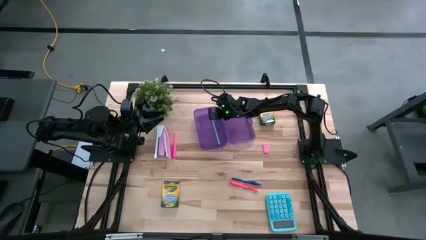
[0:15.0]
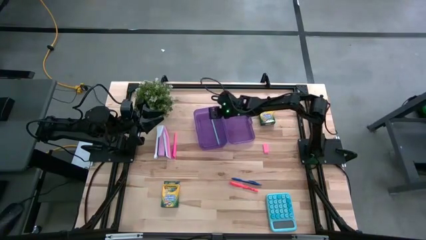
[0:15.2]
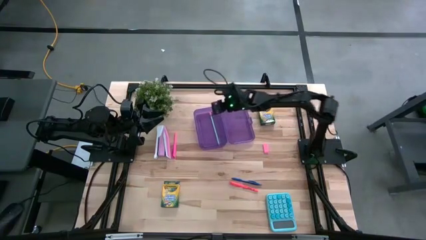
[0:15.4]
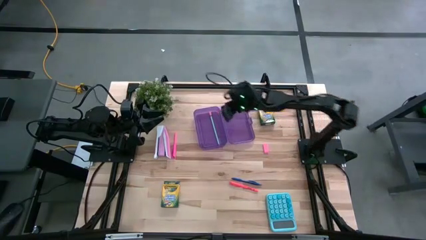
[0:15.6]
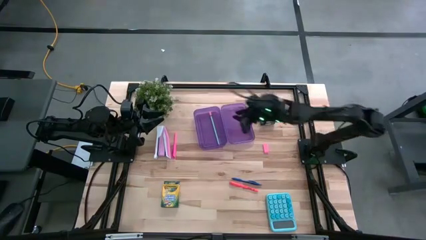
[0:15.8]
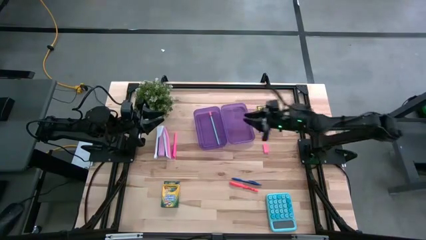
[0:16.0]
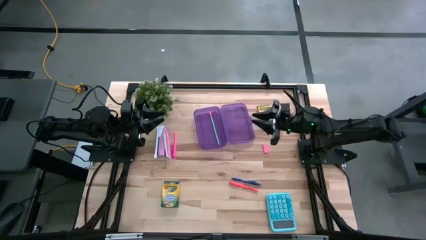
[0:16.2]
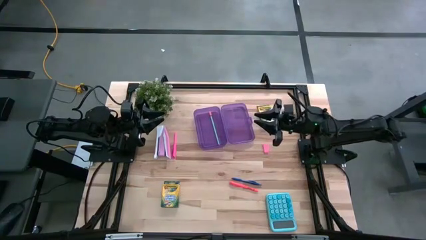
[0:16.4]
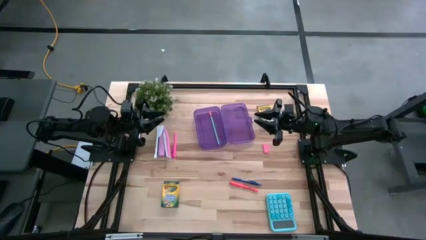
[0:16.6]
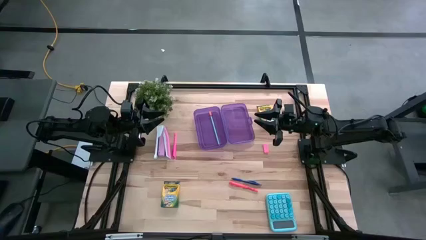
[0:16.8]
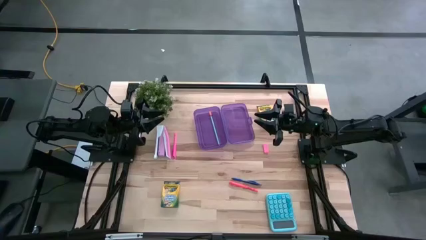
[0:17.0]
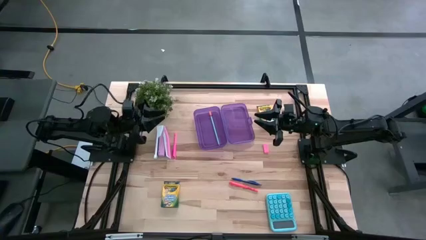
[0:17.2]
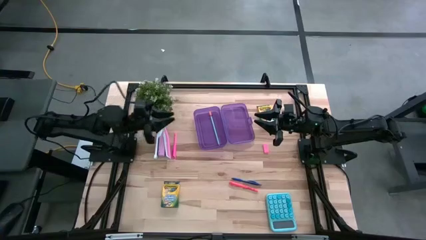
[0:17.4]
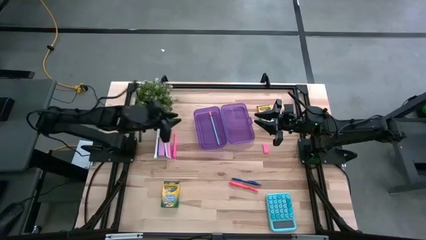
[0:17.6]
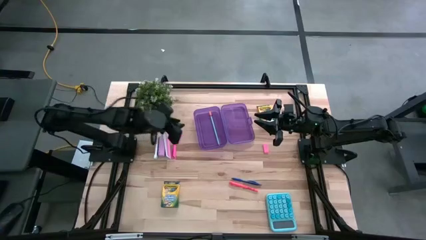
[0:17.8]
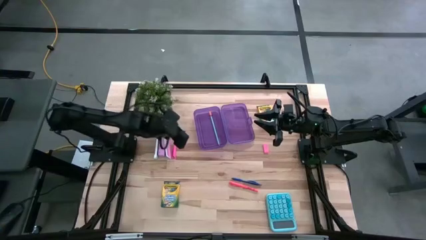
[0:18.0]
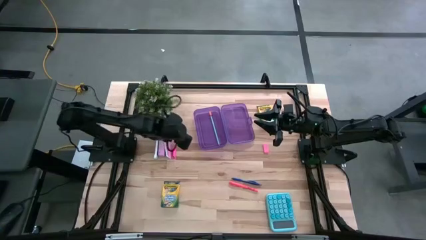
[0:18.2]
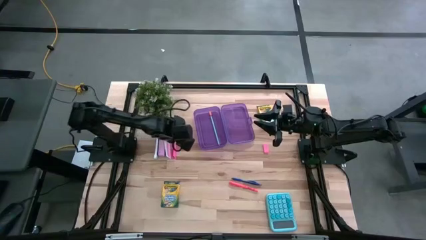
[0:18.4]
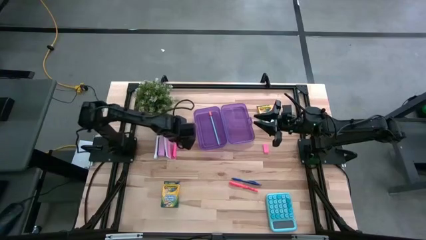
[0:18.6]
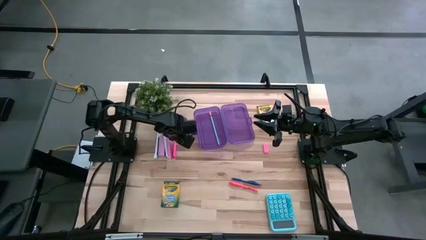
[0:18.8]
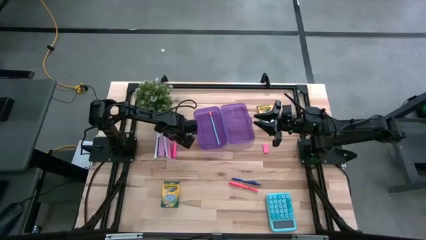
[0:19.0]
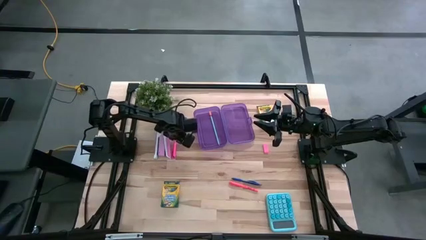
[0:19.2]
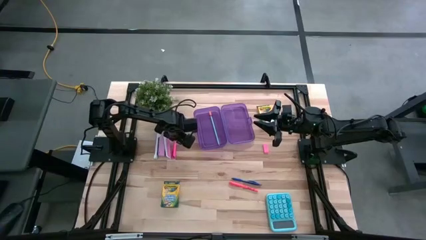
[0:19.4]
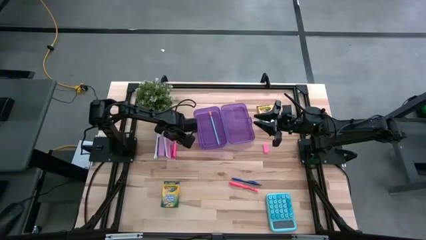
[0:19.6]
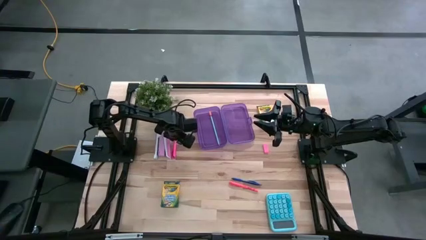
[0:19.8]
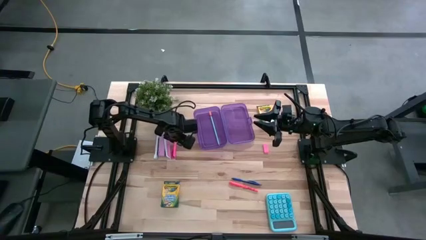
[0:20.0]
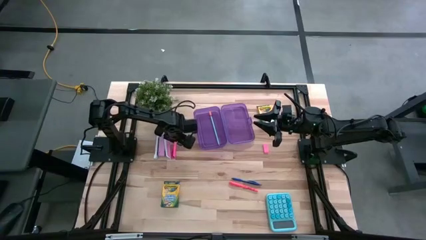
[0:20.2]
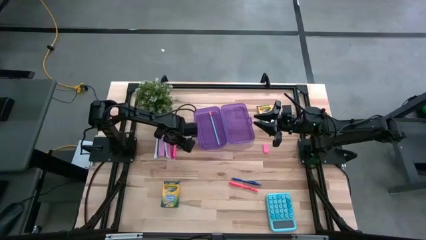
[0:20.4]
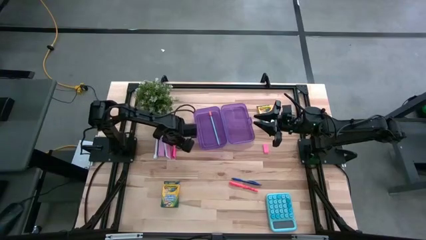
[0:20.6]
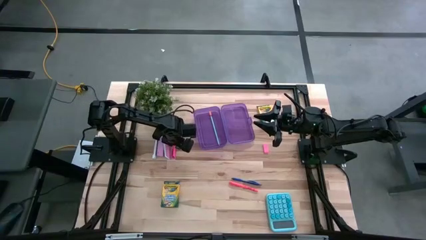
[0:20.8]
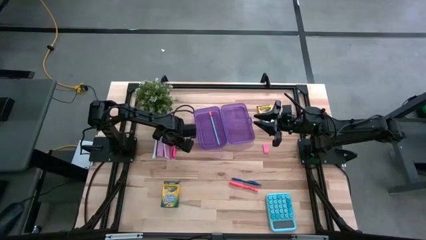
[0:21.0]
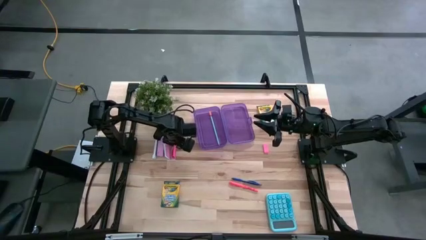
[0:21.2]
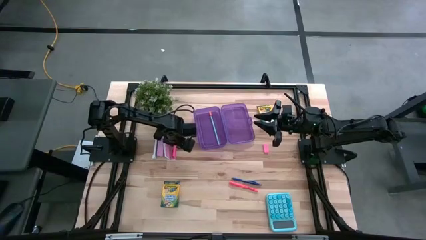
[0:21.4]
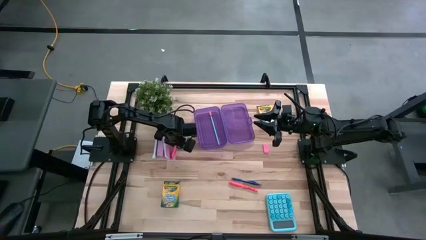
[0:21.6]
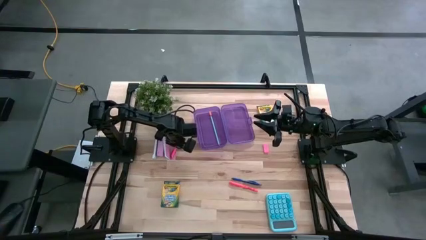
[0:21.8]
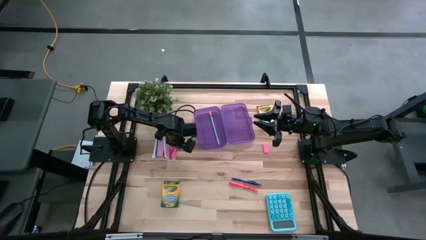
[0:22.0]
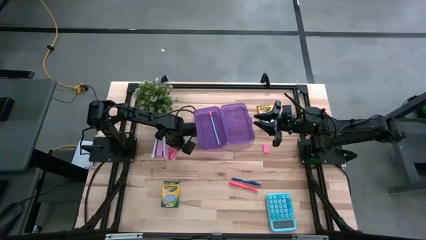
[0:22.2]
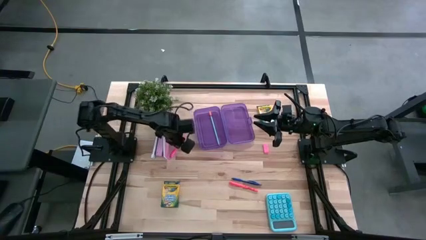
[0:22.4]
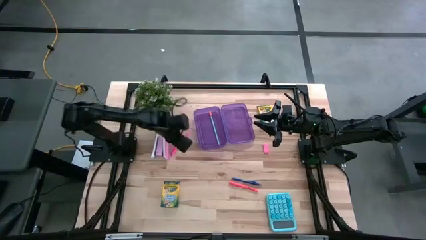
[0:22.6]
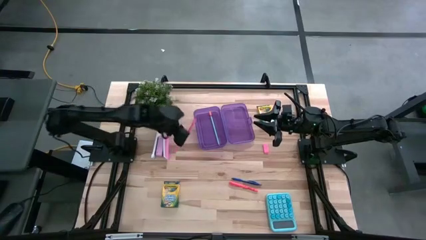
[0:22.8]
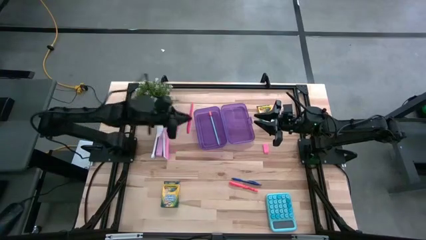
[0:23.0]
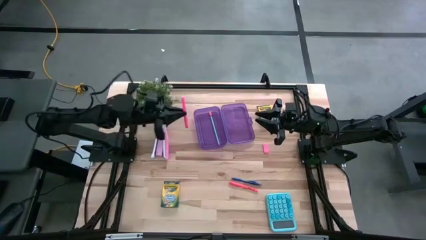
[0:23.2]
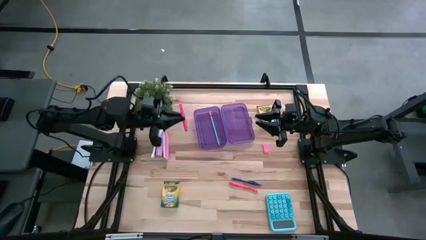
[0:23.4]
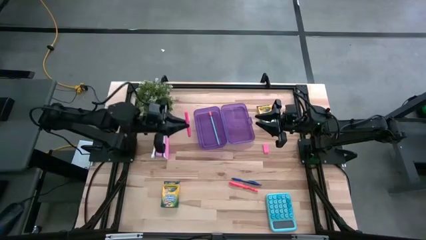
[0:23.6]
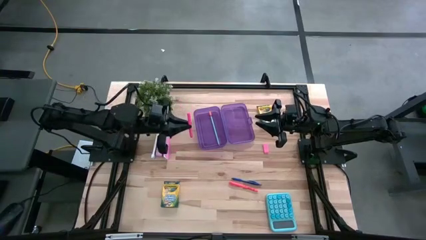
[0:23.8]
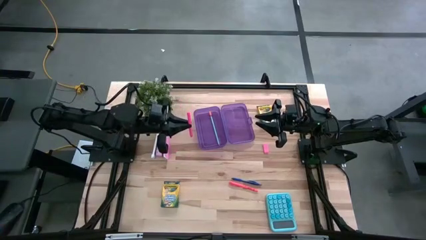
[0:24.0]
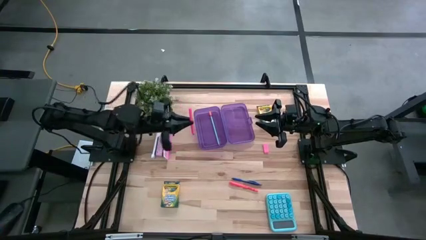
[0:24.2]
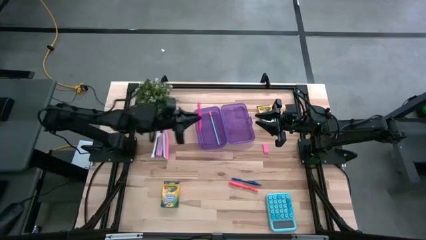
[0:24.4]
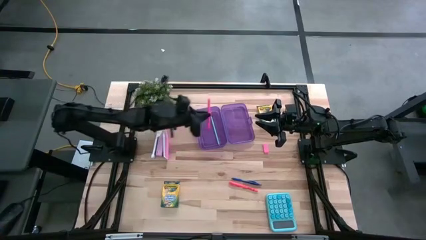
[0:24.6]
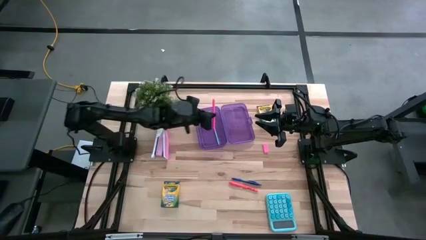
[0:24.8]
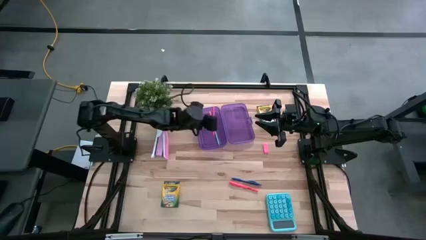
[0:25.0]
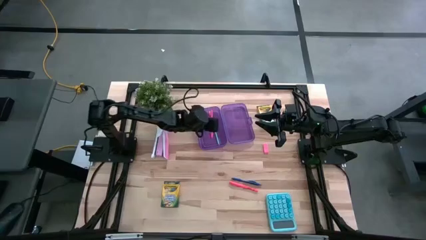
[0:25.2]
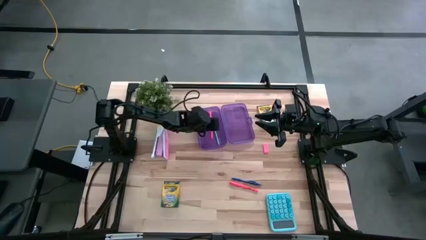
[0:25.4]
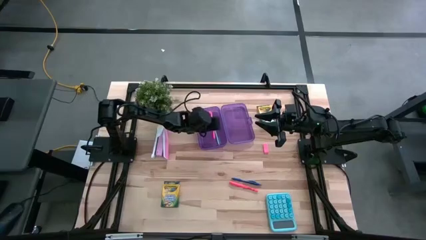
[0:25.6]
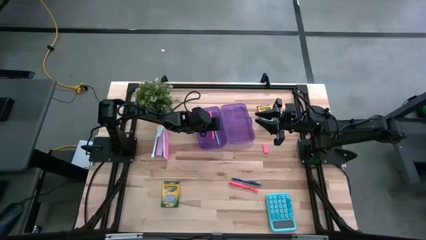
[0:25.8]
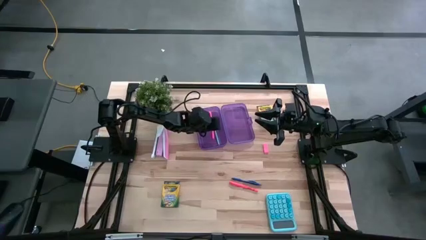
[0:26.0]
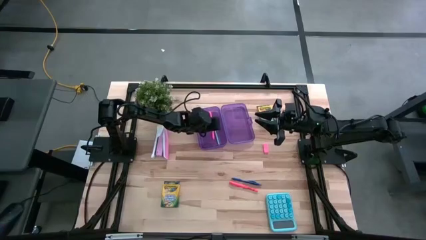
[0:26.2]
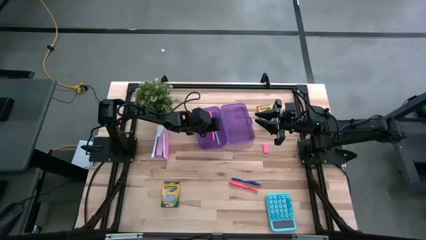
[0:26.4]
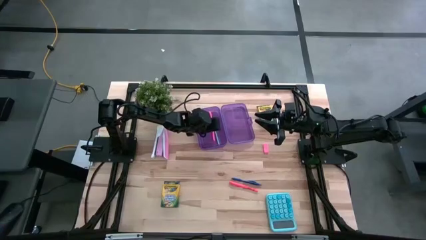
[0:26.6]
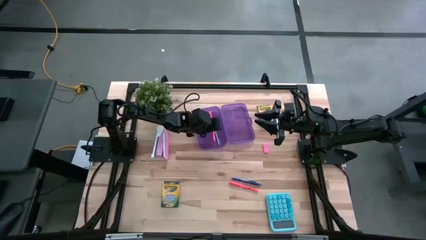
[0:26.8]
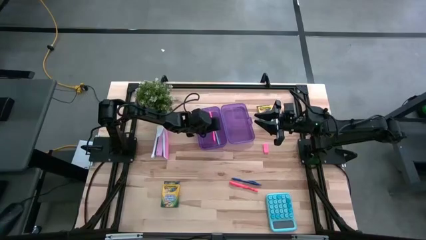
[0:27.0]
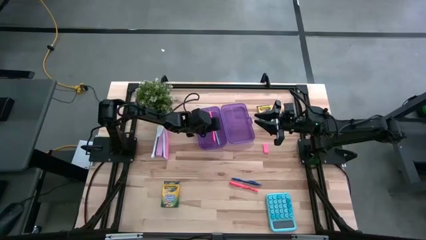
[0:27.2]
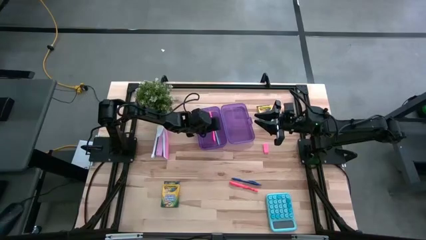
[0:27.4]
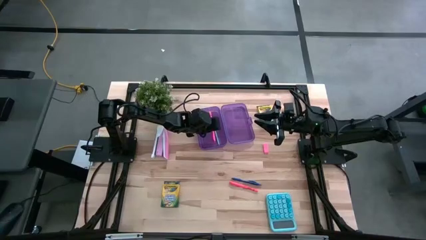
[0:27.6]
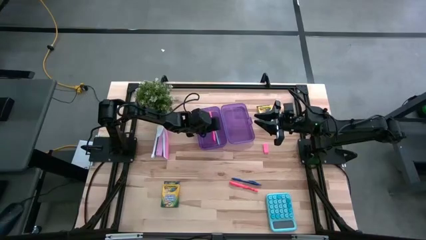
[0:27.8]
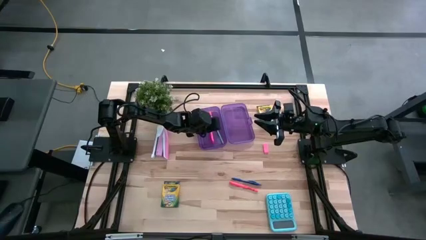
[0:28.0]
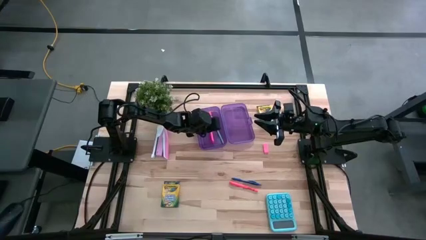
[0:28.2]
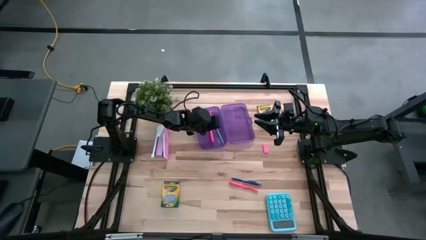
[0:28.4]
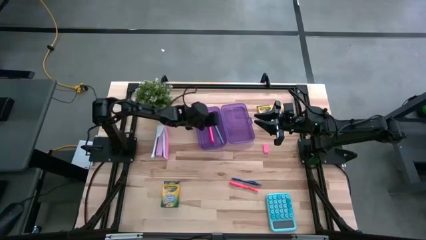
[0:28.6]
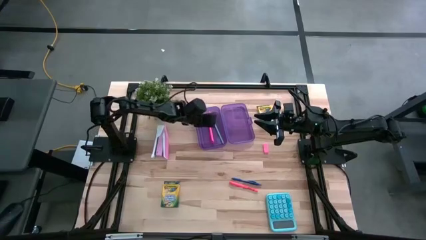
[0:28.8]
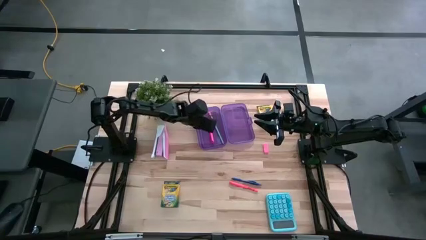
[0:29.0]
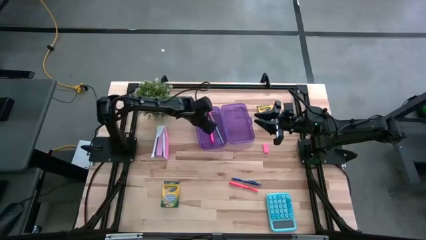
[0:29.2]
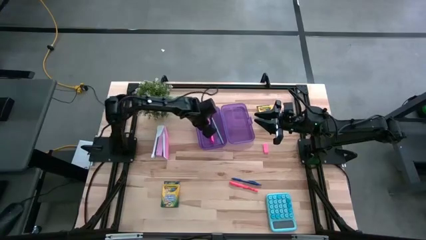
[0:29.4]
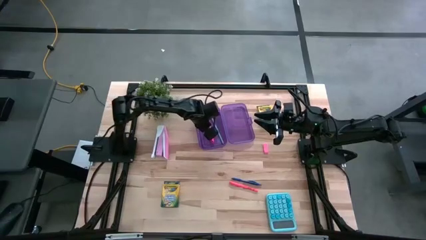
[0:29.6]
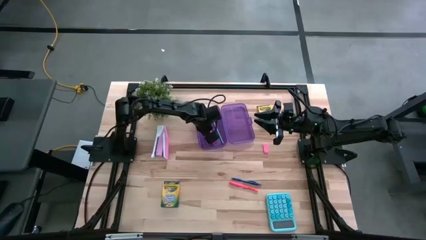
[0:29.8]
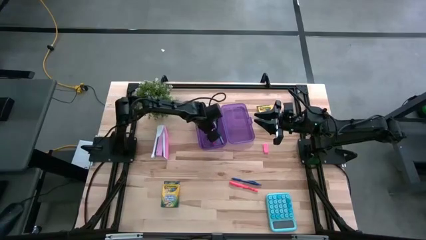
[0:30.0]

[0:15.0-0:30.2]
Task: Pick & place school supplies into a supply box
Put the pink pen into the purple supply box
